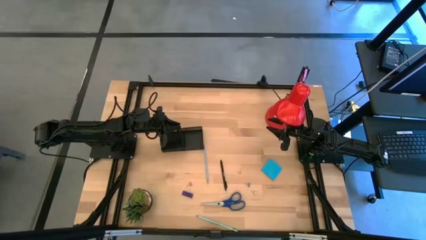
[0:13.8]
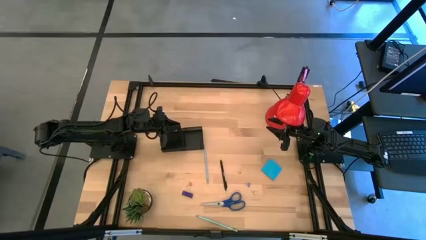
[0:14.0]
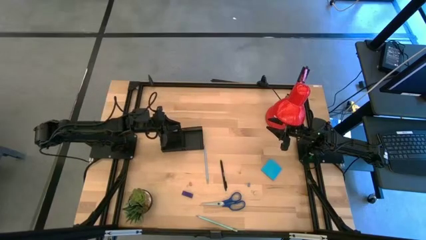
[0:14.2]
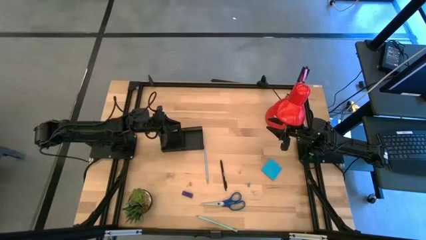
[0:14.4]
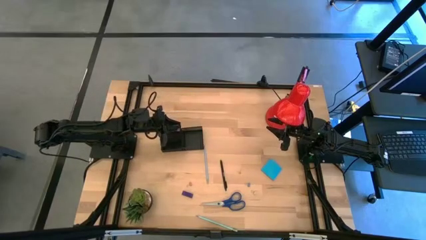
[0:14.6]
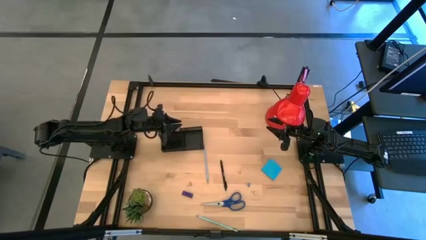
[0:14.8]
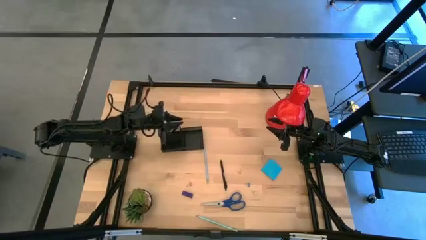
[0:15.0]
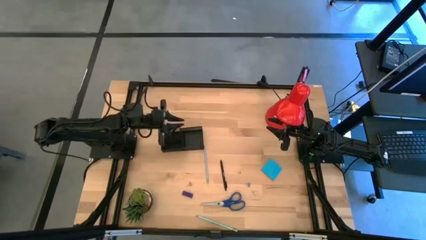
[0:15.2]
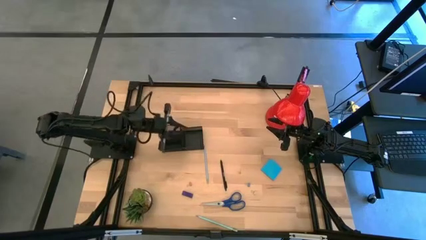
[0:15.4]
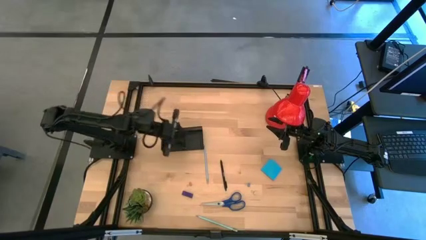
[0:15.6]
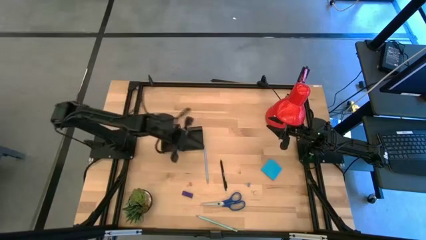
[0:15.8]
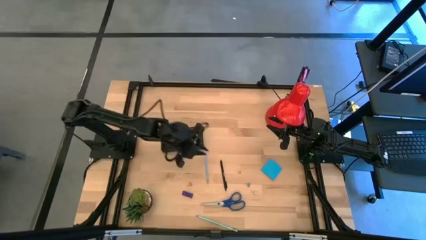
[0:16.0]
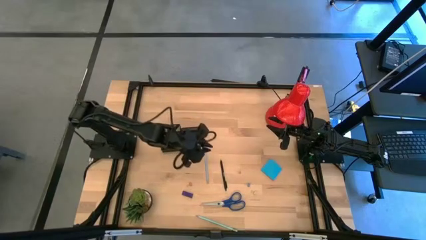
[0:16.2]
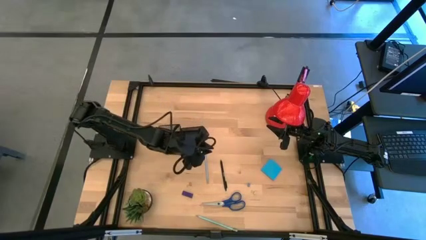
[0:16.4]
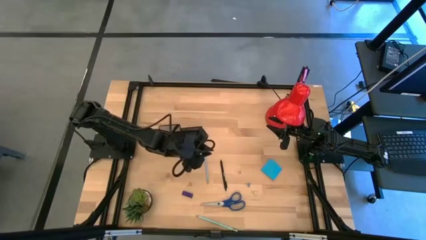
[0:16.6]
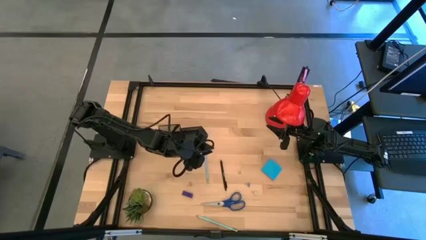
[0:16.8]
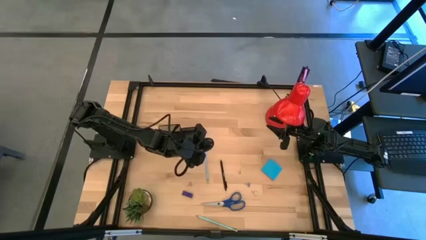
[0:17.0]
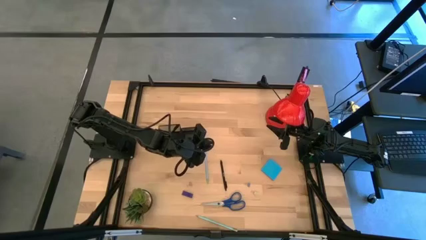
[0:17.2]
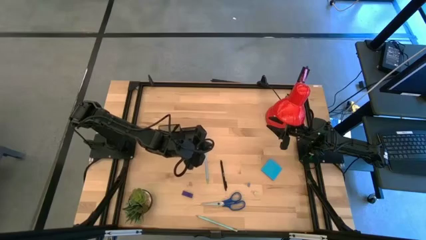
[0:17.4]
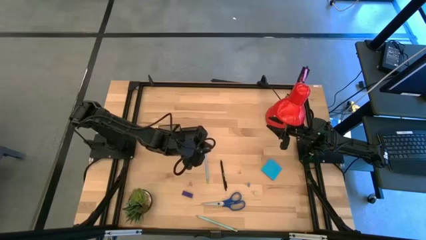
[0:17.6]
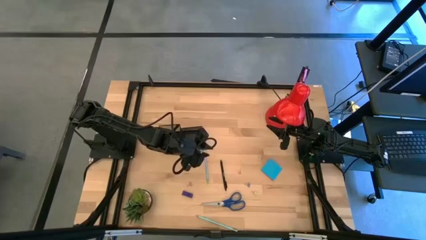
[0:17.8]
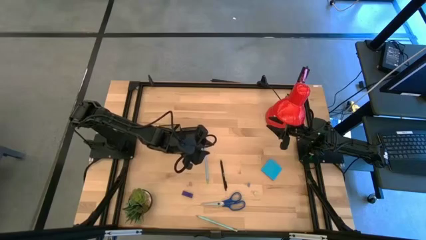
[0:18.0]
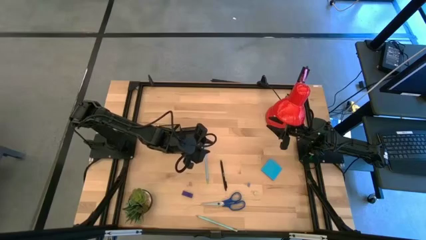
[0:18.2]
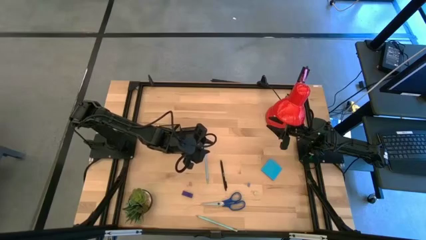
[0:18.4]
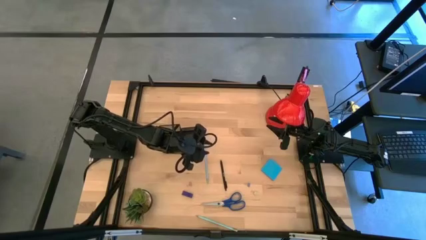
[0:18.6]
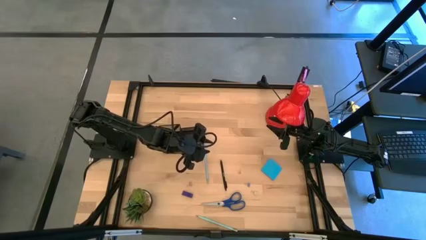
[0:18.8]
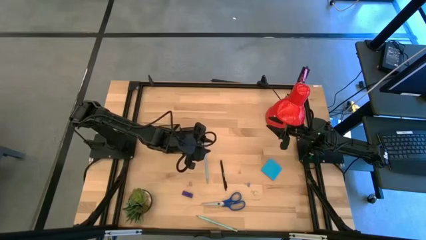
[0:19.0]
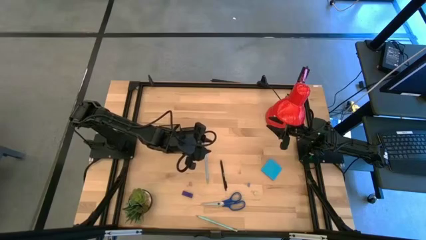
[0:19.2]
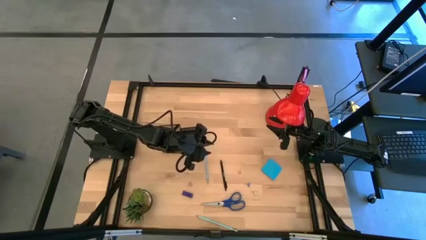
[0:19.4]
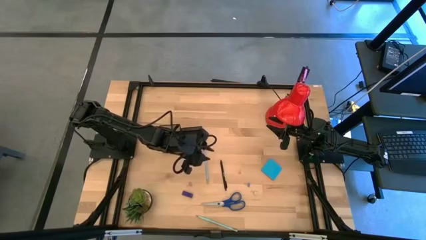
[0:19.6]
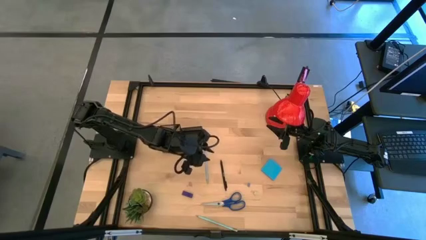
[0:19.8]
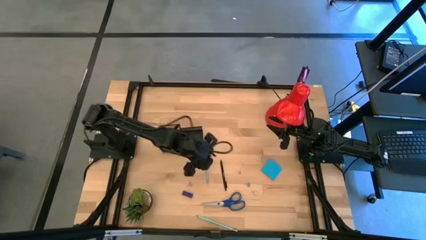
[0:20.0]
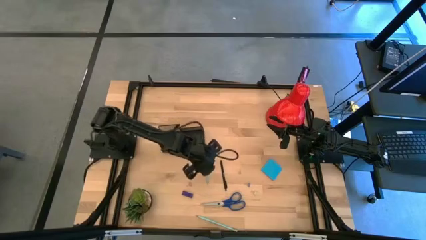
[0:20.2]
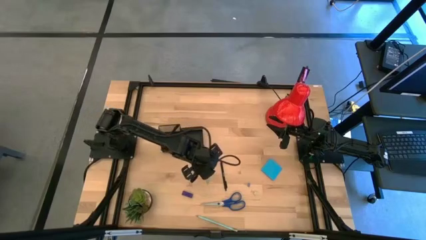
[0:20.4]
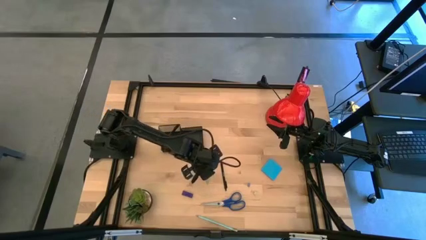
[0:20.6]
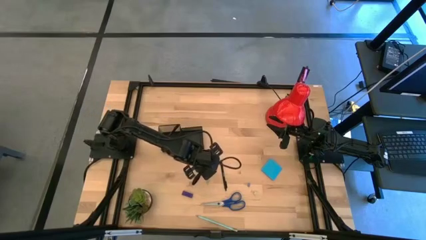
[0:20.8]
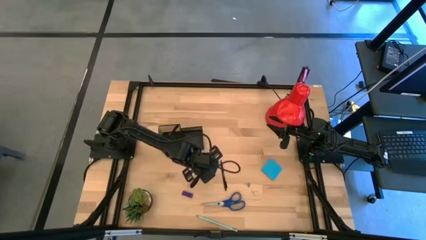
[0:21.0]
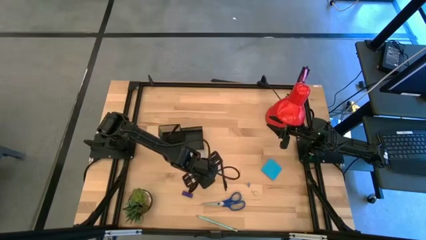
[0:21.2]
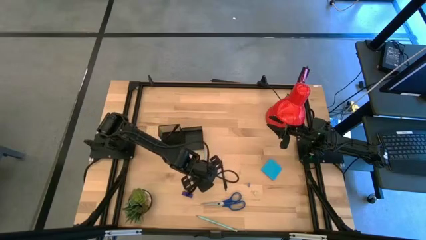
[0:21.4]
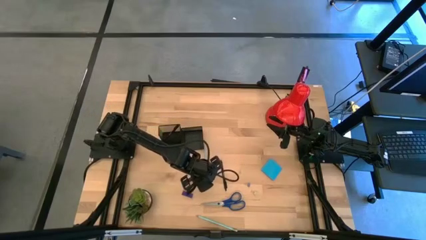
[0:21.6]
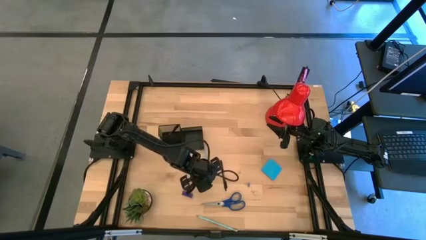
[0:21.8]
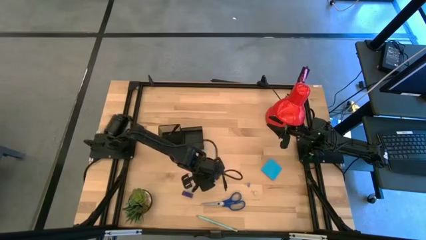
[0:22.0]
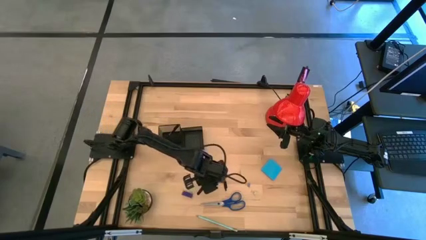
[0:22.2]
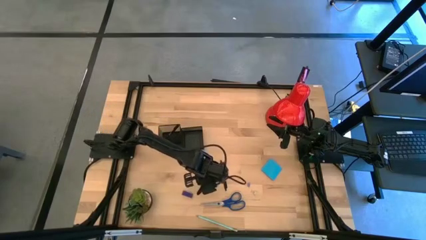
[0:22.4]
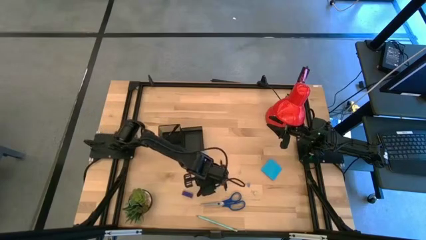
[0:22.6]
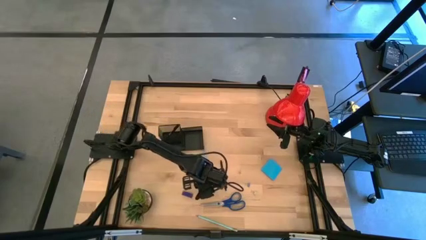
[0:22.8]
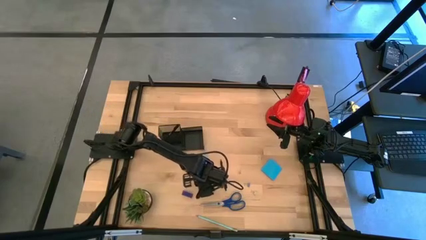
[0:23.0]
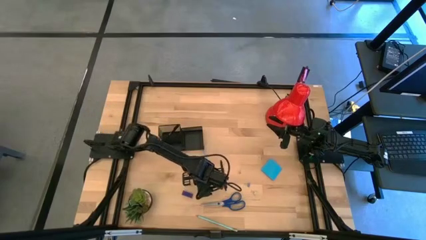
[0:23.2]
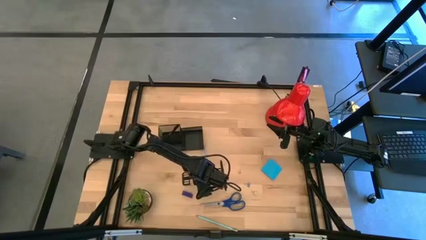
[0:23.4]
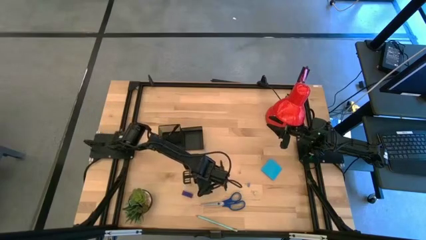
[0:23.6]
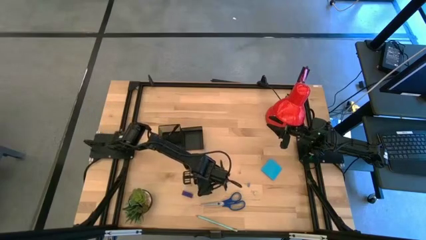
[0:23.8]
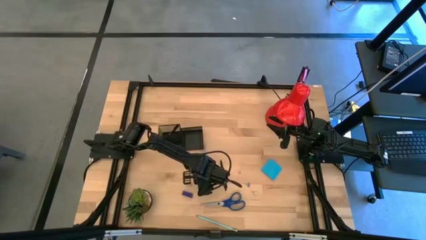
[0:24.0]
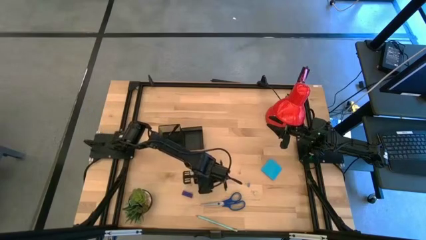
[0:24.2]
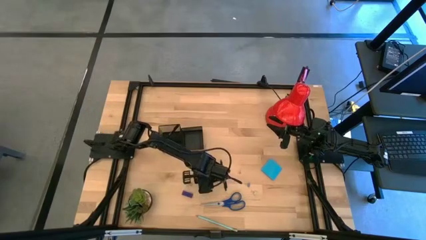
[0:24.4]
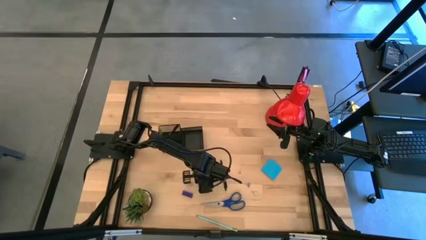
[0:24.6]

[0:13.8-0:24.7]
Task: Pick and place office supplies into organizer
Put the top blue pencil into the black desk organizer
